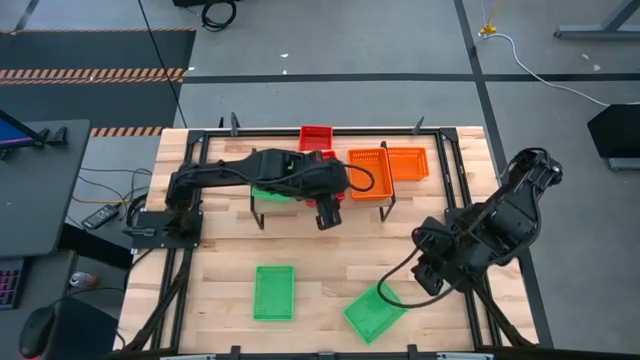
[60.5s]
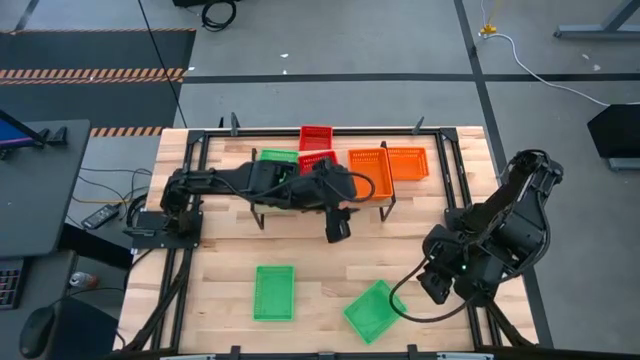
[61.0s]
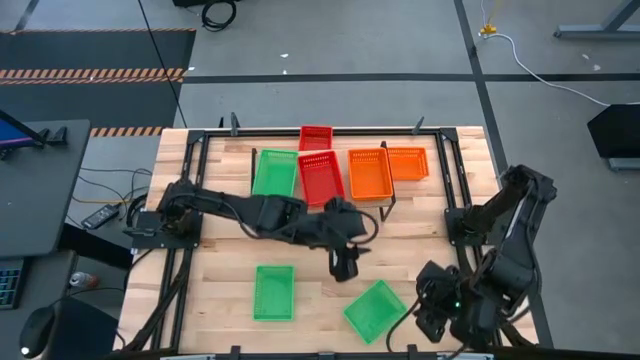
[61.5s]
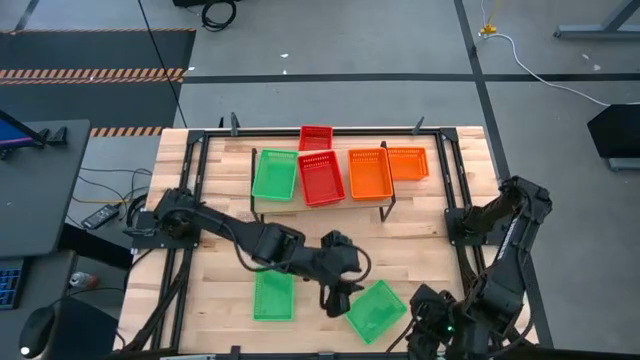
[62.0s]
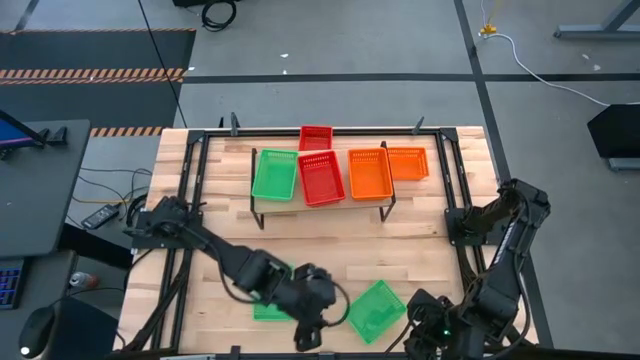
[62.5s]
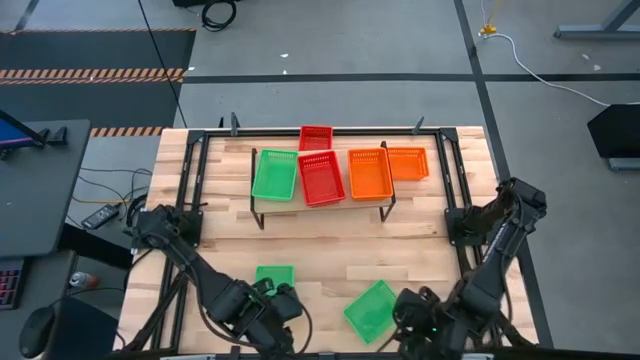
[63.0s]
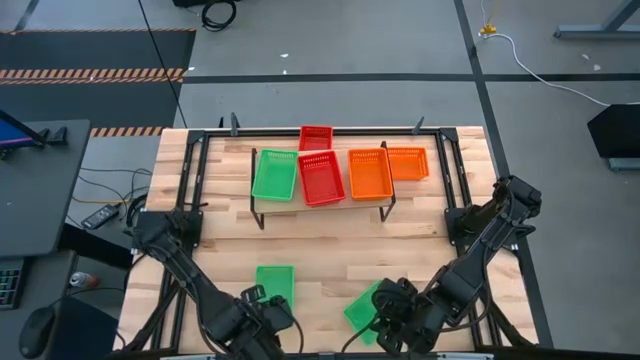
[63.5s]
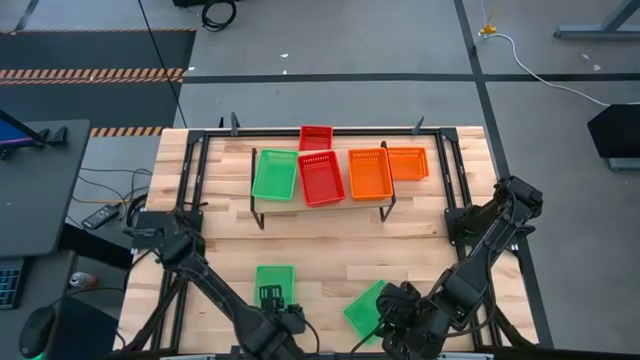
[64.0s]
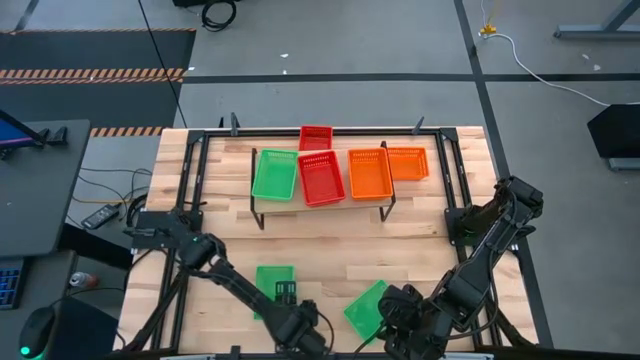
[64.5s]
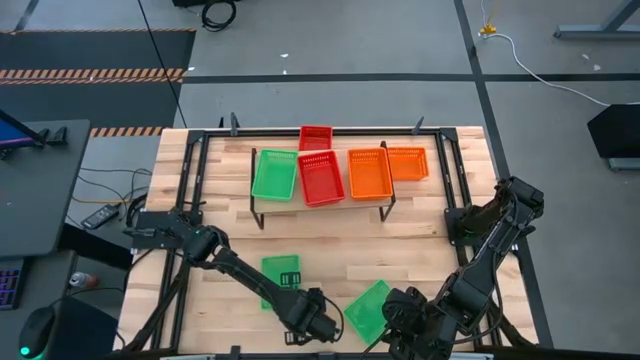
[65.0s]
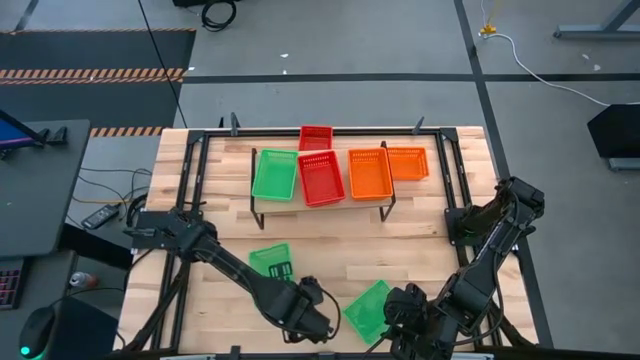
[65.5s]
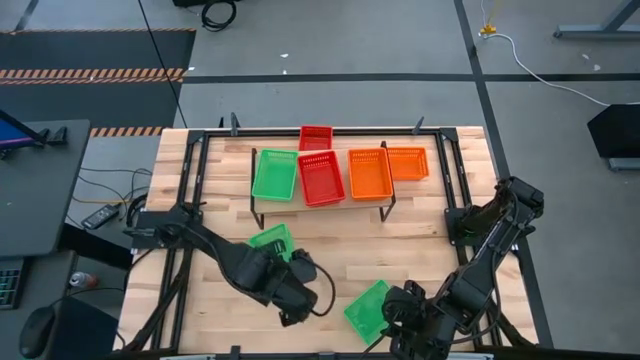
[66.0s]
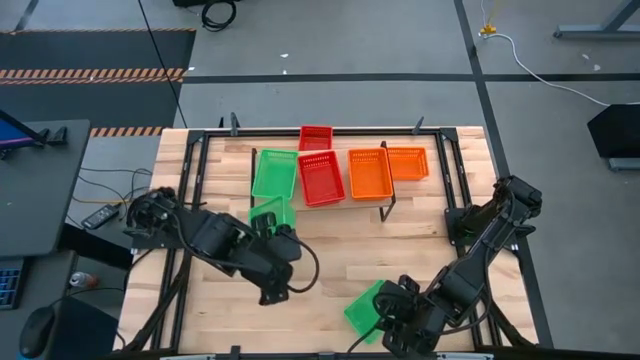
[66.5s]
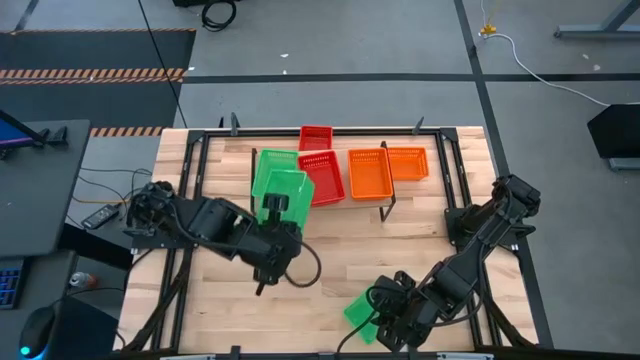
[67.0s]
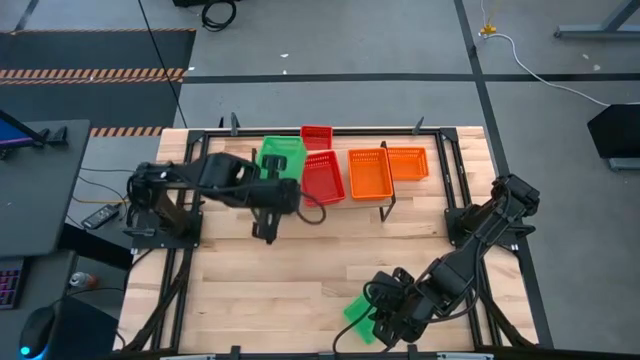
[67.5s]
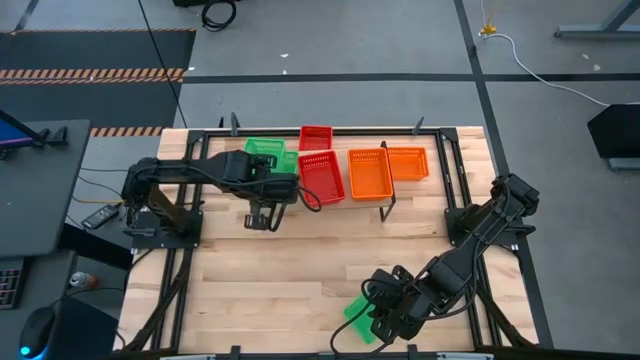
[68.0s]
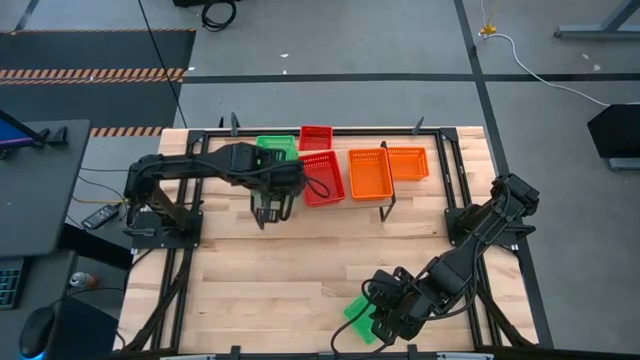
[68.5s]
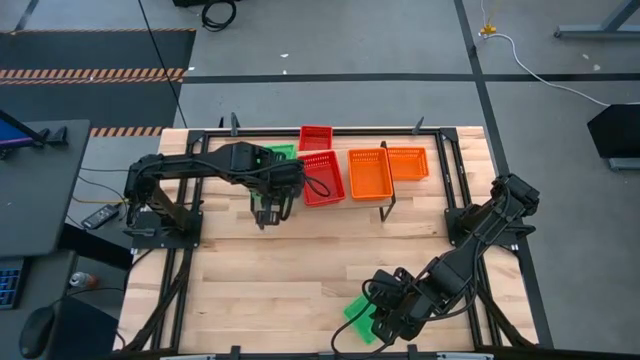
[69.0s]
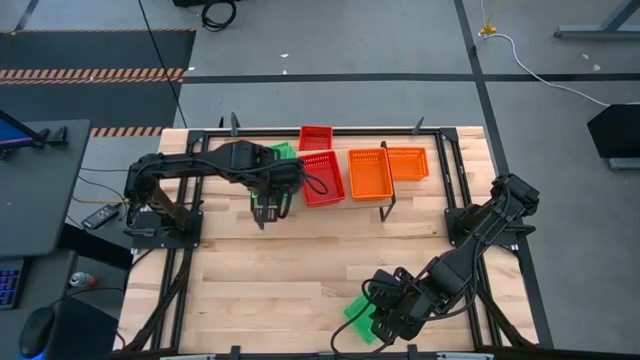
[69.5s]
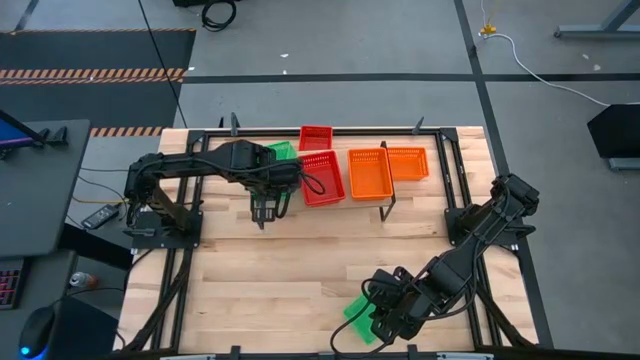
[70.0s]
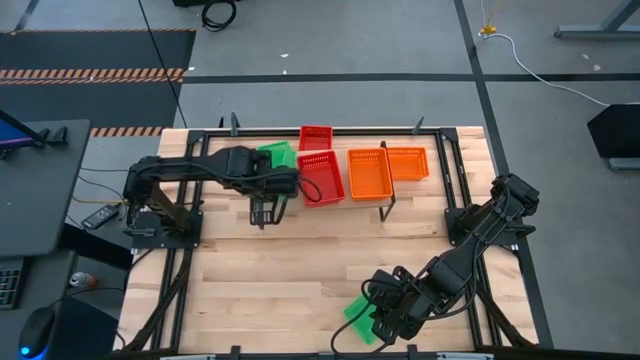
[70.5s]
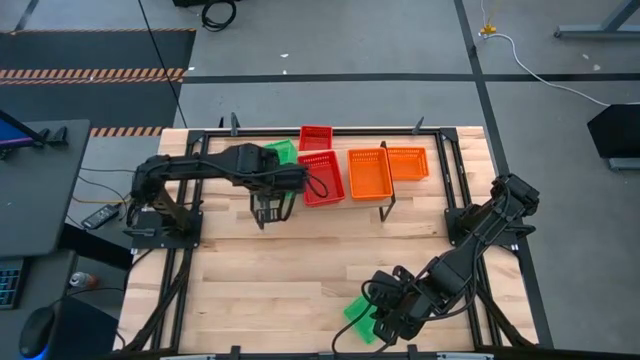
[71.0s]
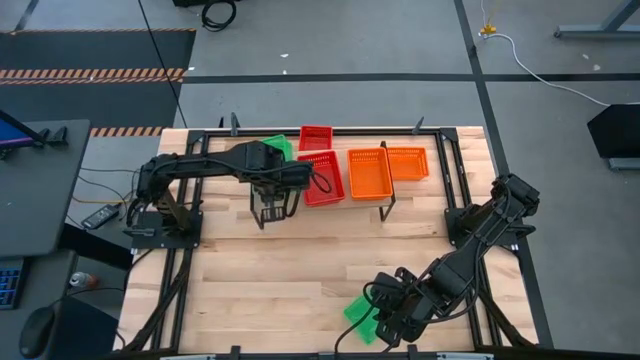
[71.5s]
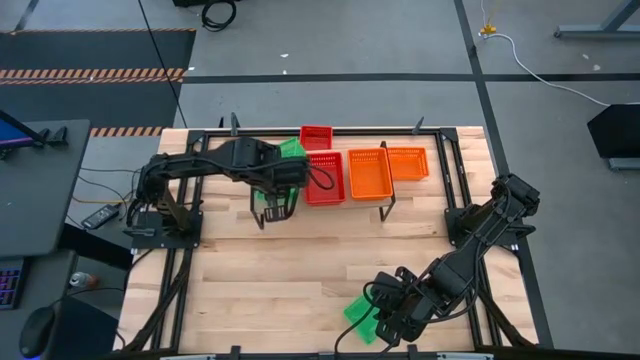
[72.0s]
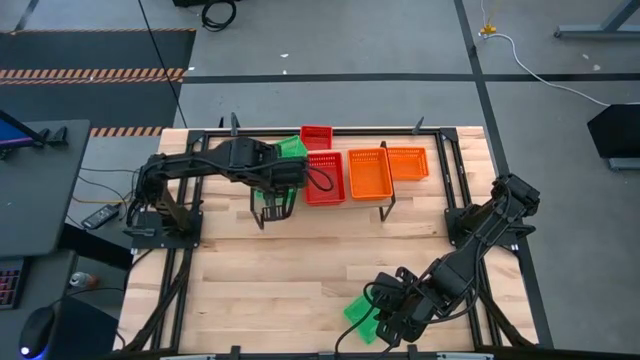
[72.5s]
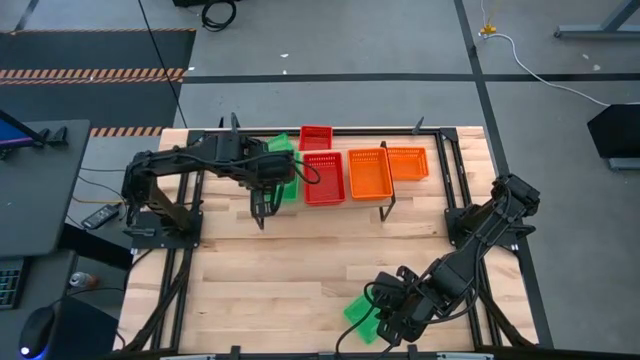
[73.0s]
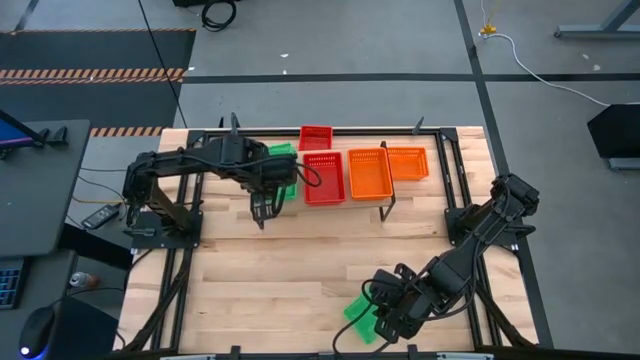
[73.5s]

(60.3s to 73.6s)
Task: Stack baskets on shelf by color
Stack the left green bin on top of the other green bin on the shelf

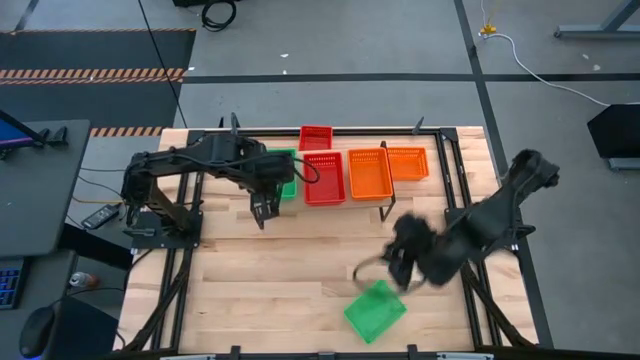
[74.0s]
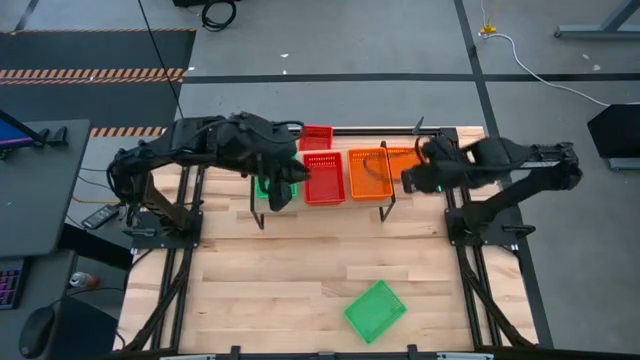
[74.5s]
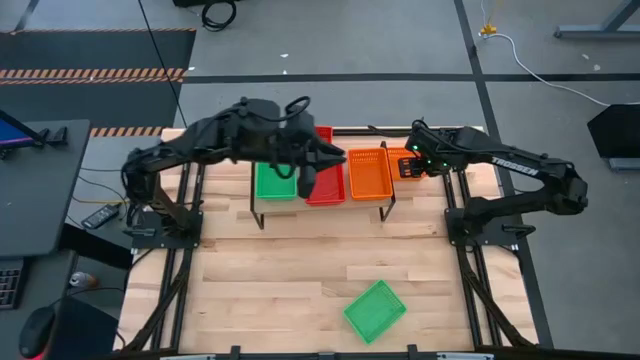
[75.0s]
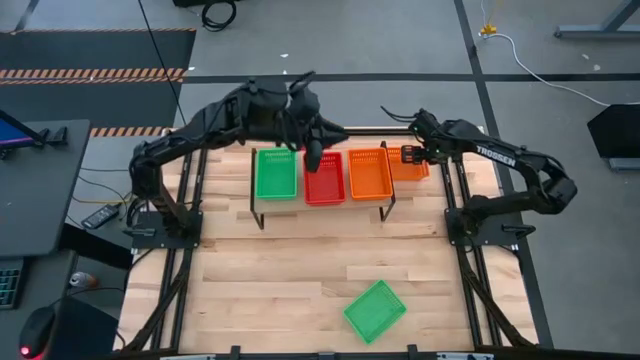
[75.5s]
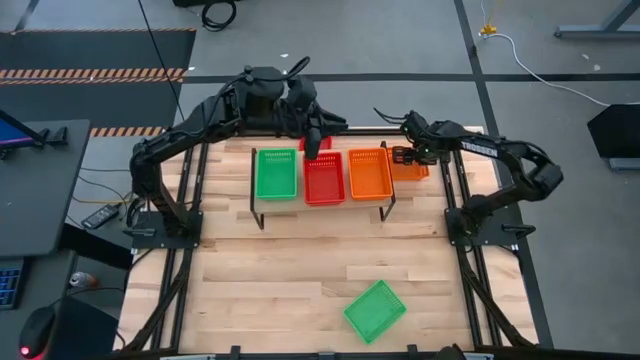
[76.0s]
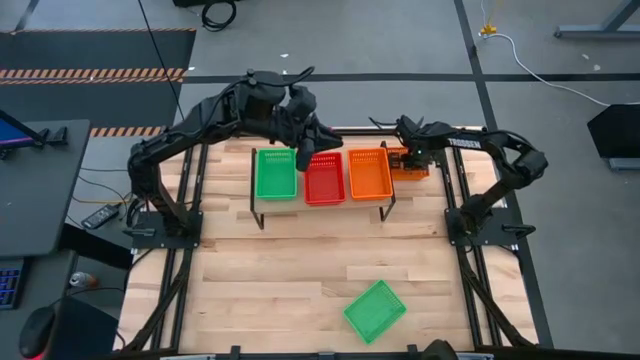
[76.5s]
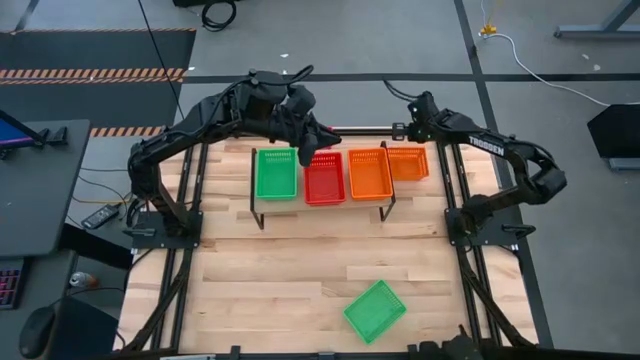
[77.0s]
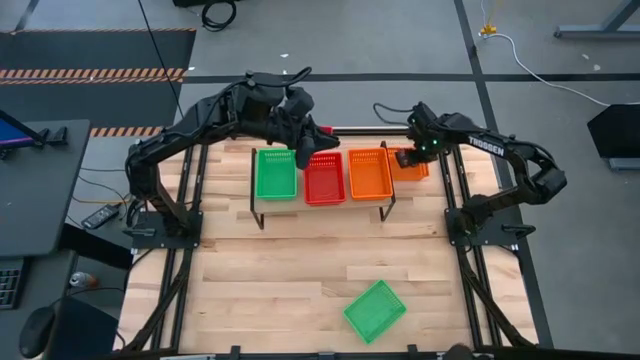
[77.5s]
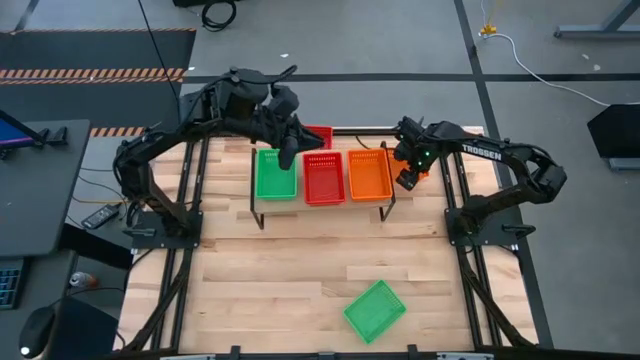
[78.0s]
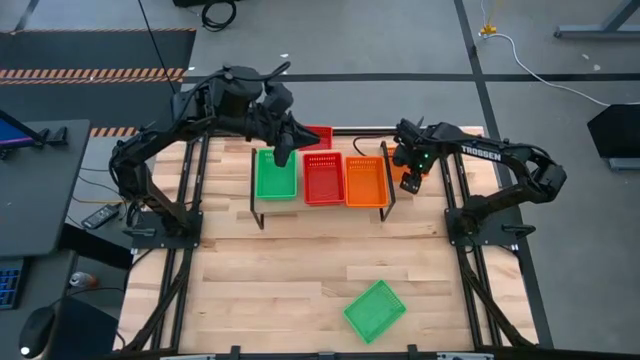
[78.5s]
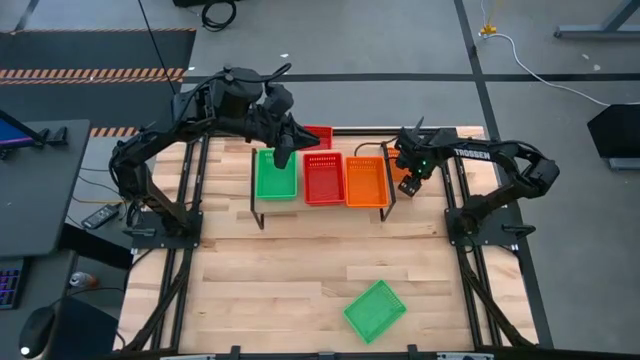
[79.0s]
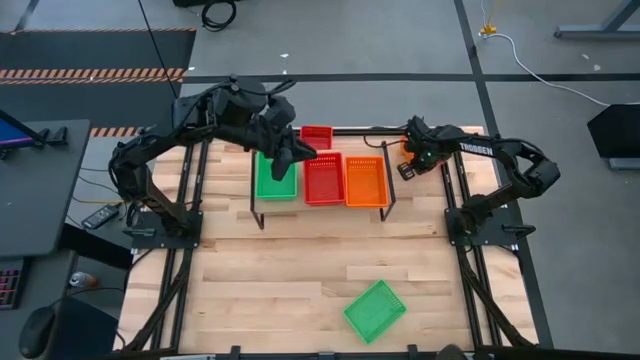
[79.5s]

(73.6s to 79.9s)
Stack the orange bin on top of the other stacked orange bin on the shelf

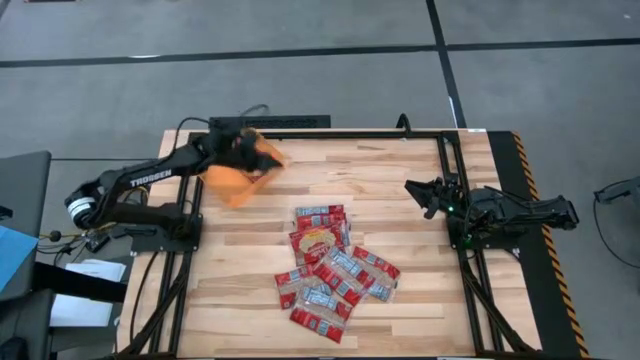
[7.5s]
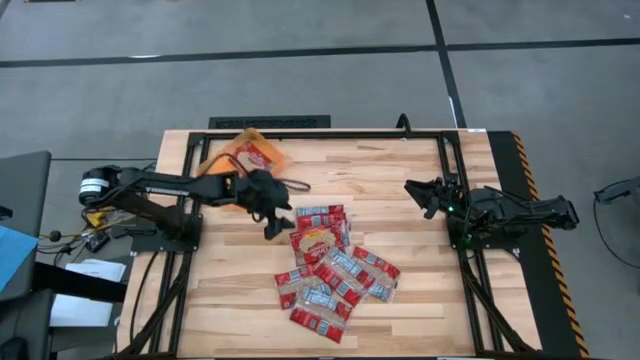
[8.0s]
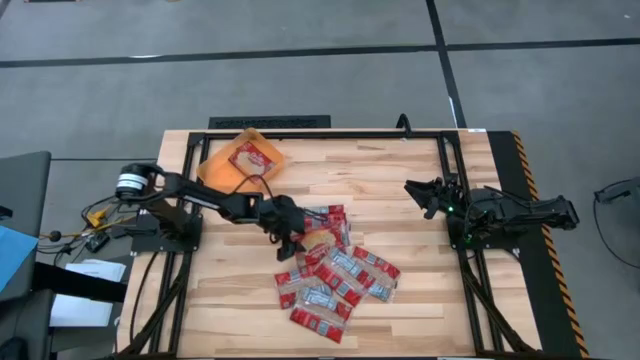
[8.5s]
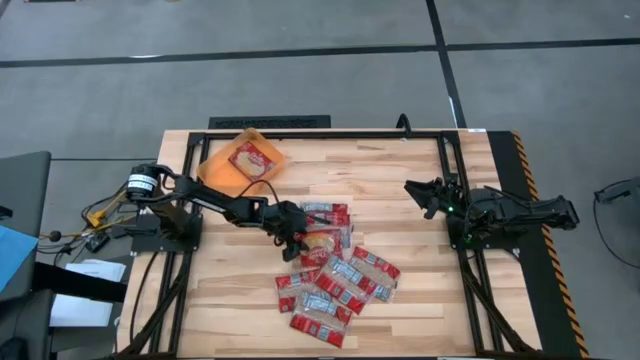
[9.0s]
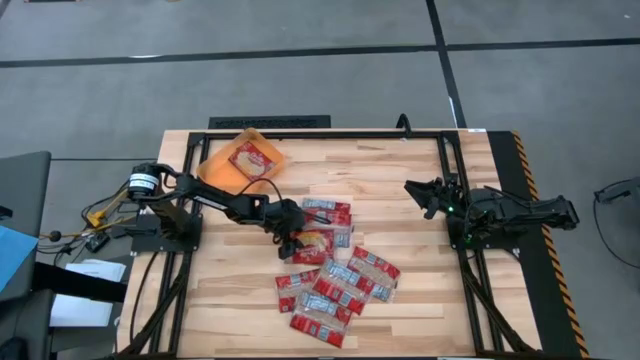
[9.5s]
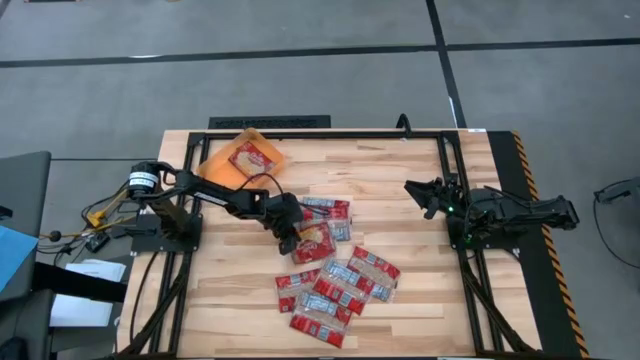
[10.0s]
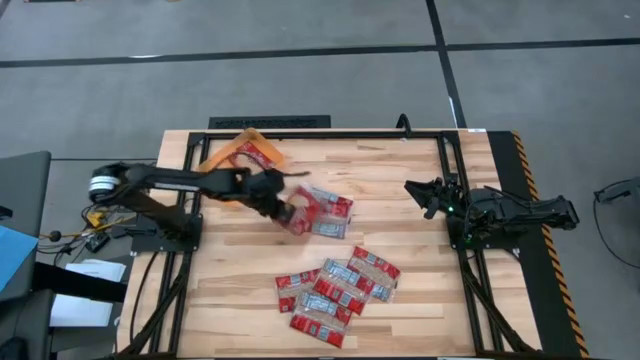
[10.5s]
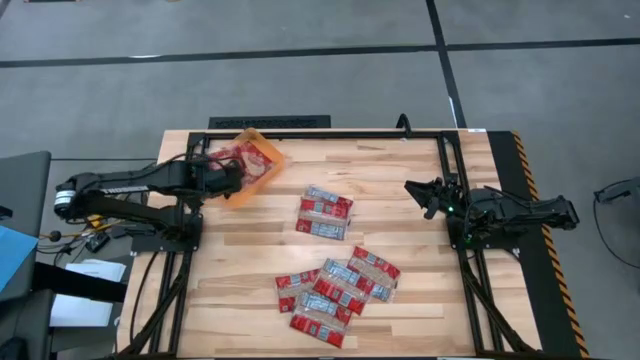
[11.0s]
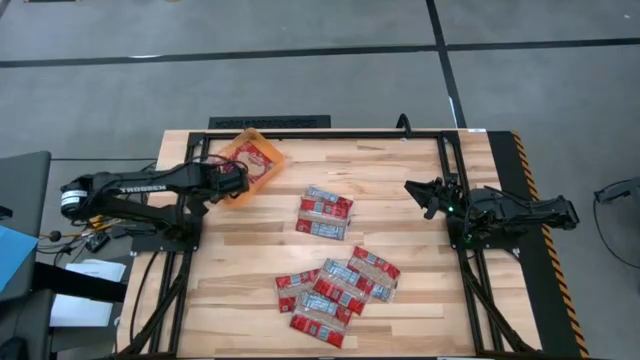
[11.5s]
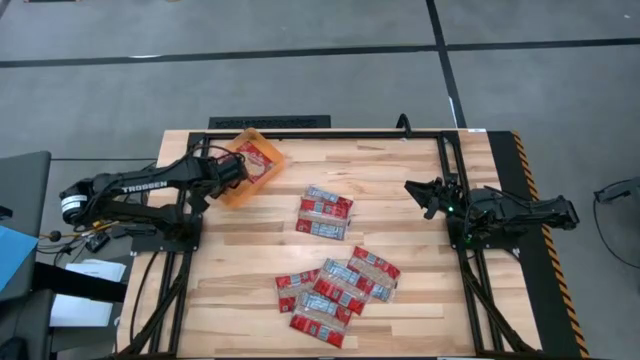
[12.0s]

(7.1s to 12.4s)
Task: Sort popcorn bags into baskets
Put the red popcorn pack into the orange bin
